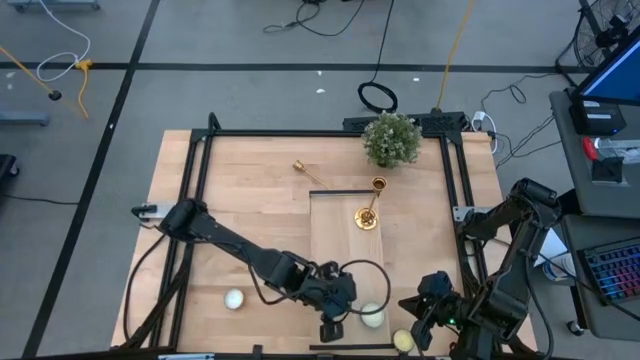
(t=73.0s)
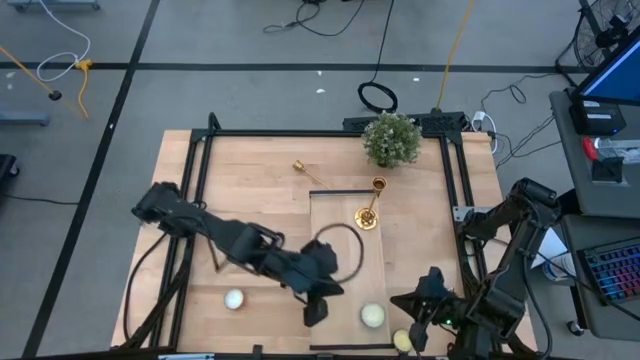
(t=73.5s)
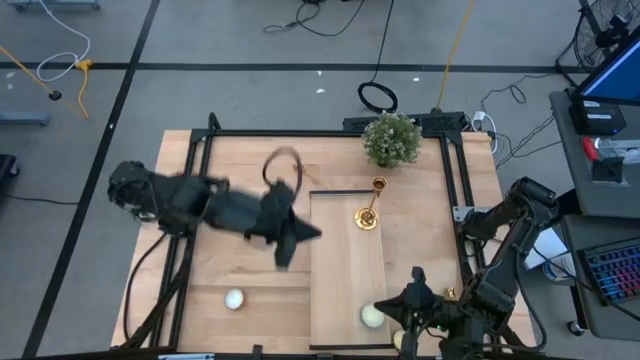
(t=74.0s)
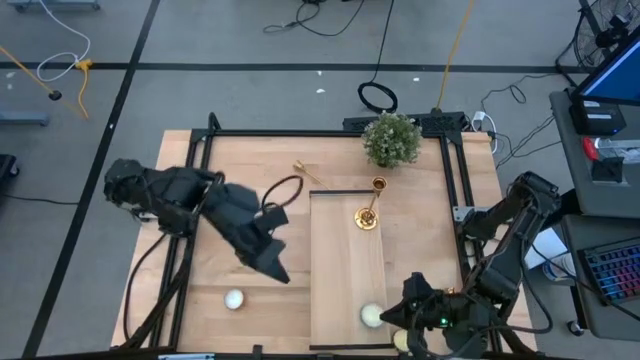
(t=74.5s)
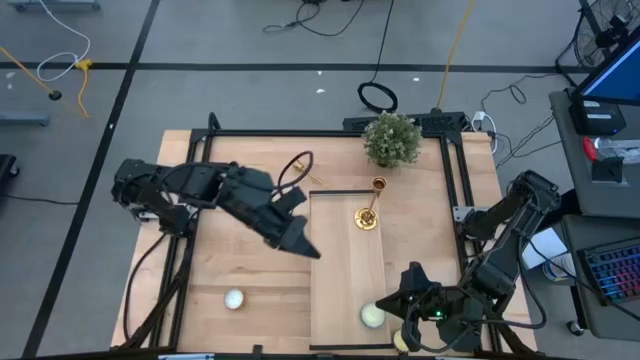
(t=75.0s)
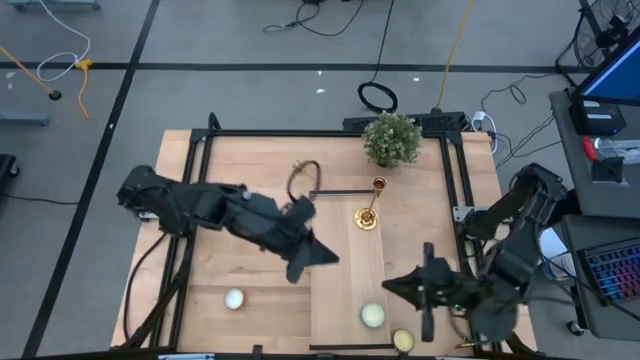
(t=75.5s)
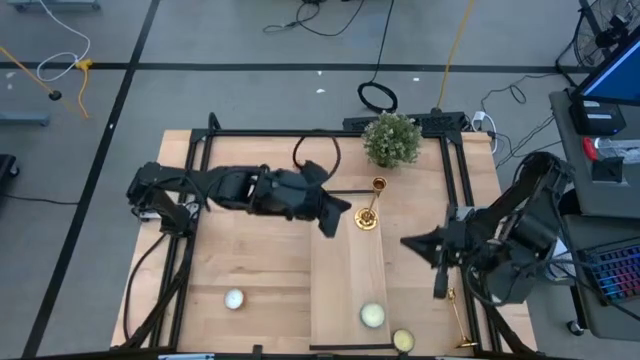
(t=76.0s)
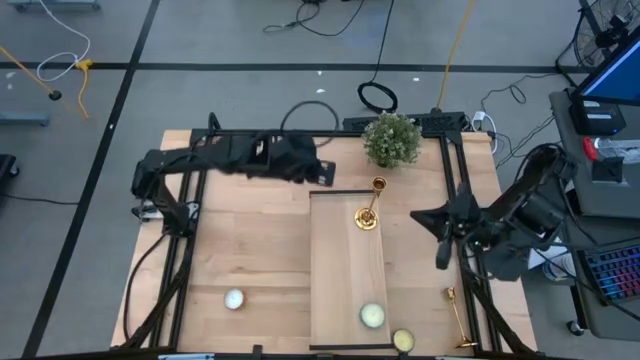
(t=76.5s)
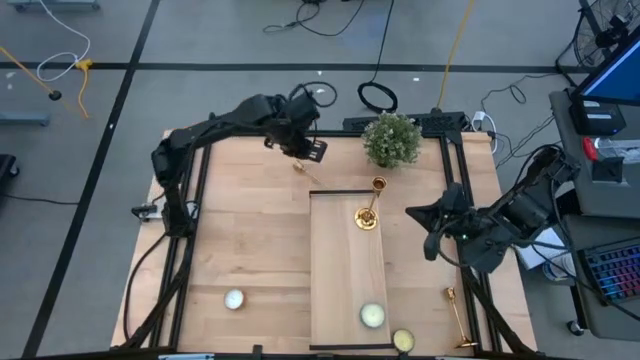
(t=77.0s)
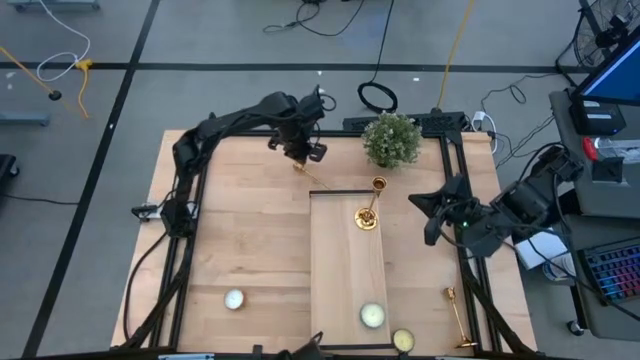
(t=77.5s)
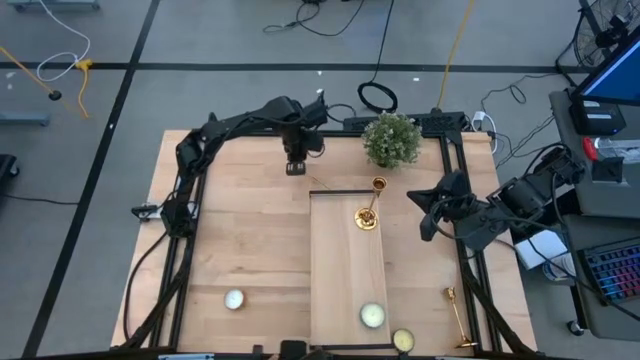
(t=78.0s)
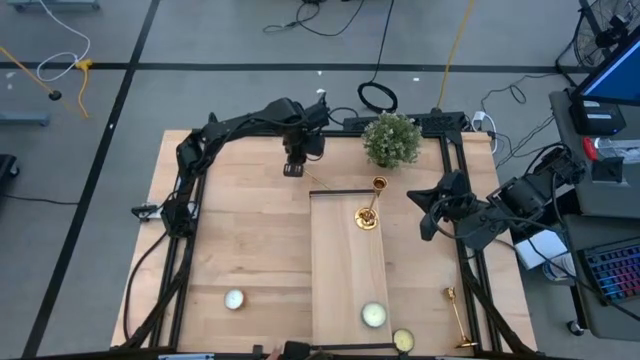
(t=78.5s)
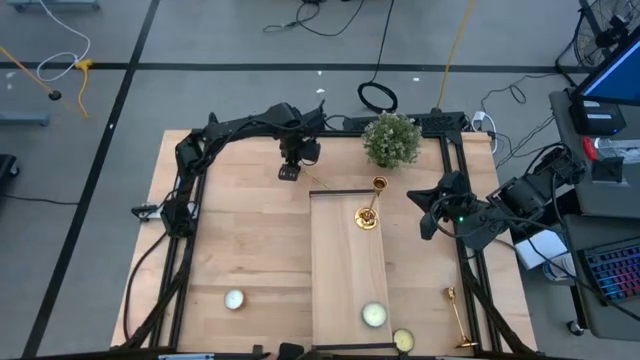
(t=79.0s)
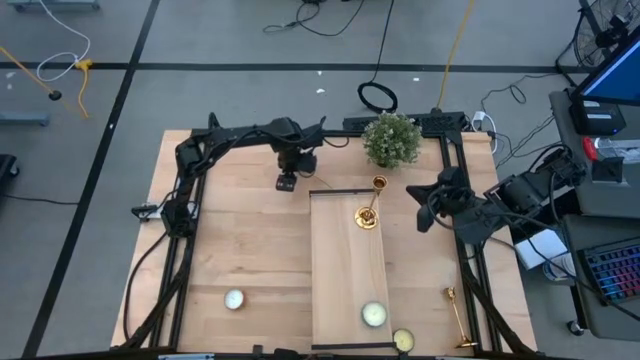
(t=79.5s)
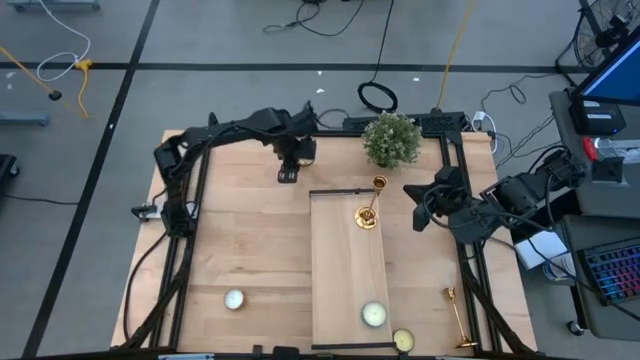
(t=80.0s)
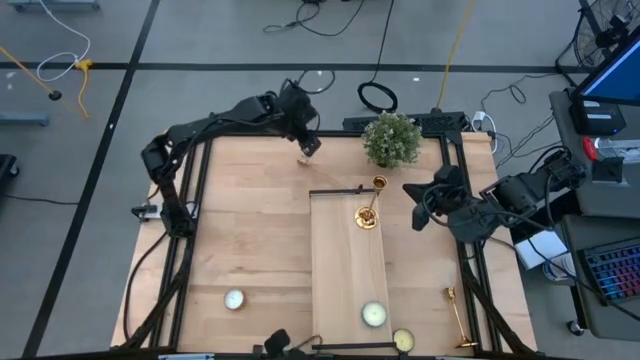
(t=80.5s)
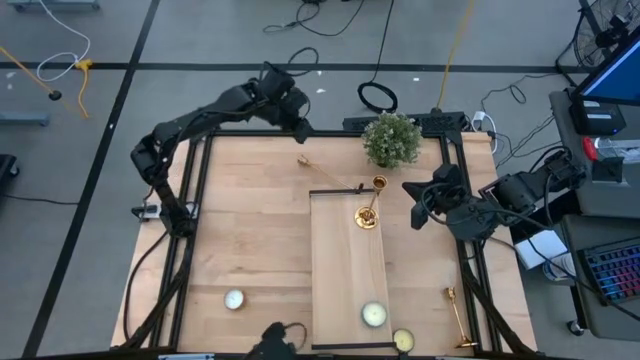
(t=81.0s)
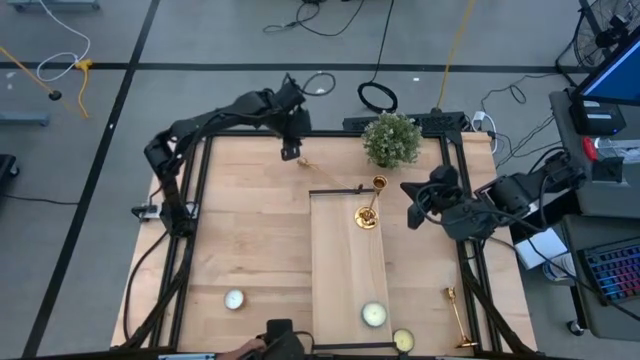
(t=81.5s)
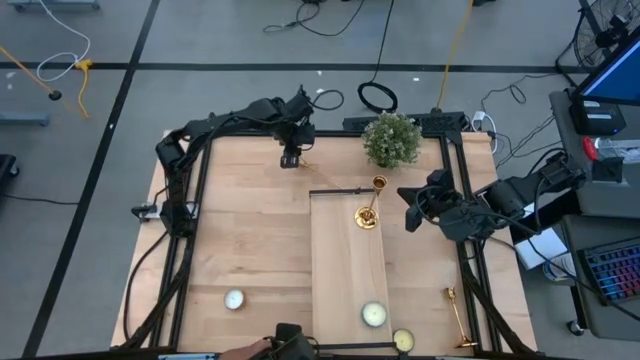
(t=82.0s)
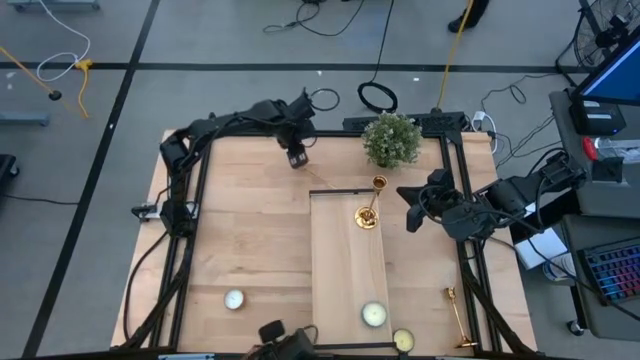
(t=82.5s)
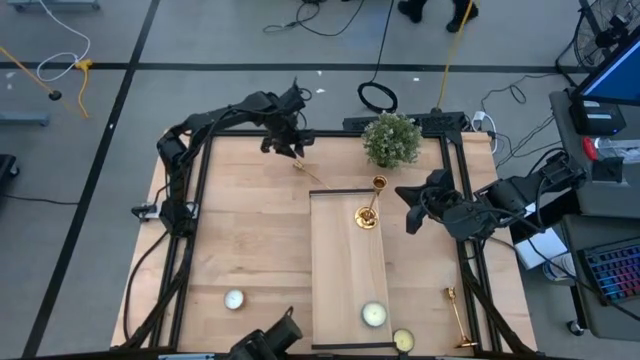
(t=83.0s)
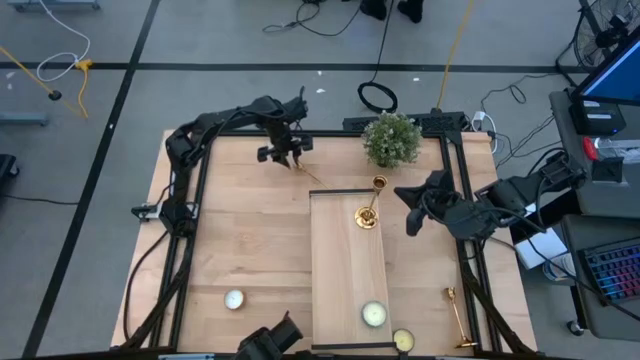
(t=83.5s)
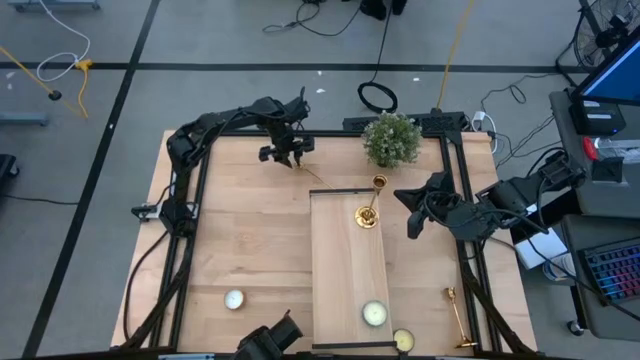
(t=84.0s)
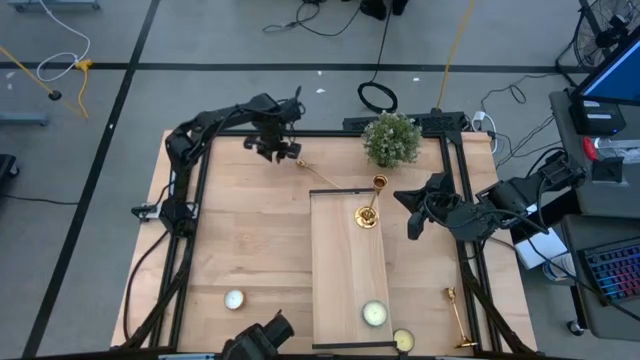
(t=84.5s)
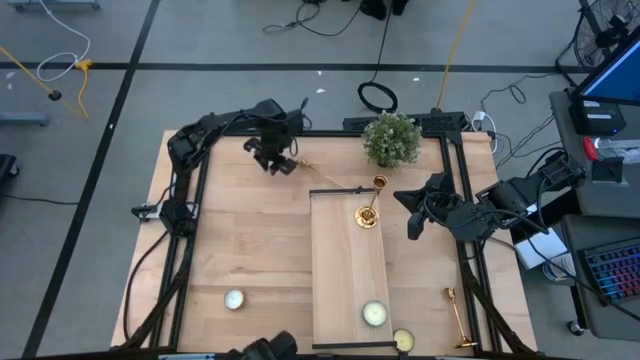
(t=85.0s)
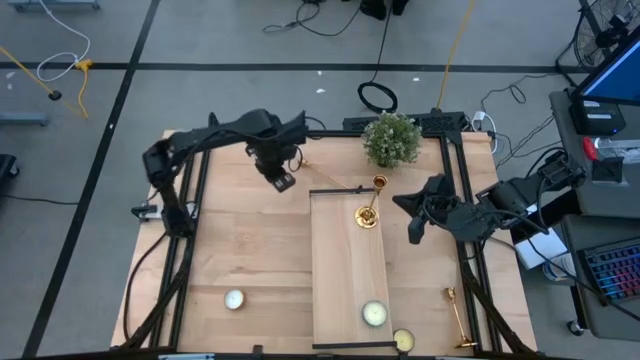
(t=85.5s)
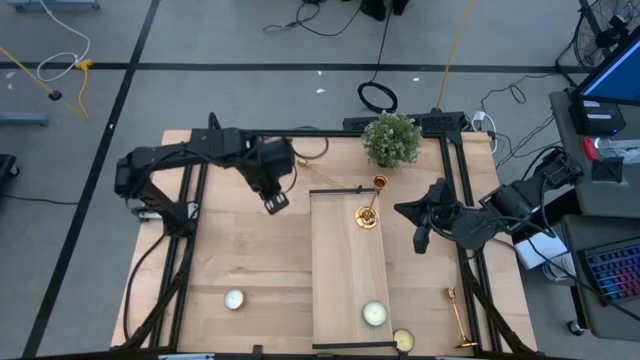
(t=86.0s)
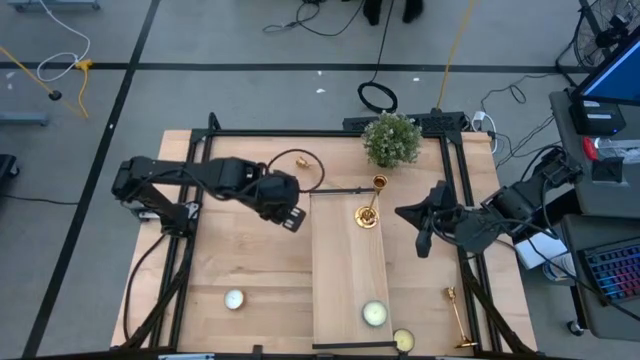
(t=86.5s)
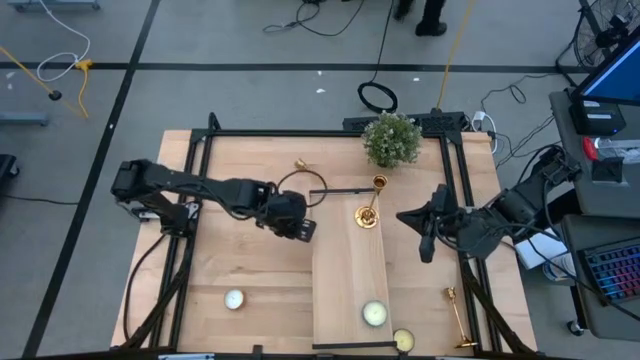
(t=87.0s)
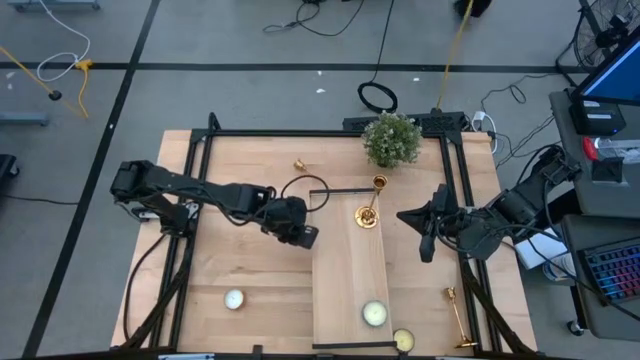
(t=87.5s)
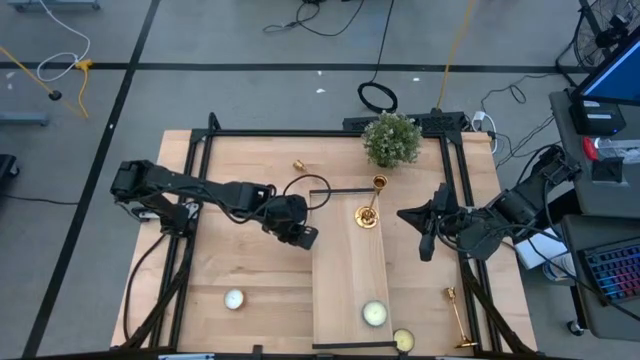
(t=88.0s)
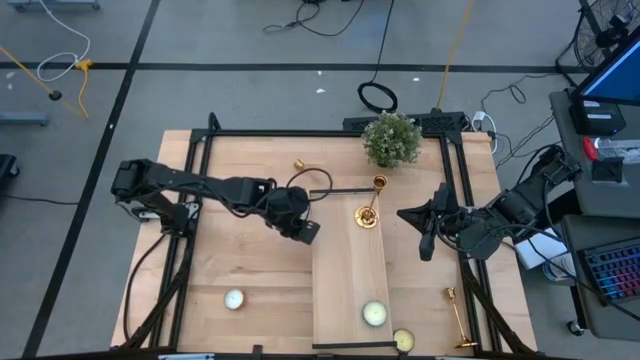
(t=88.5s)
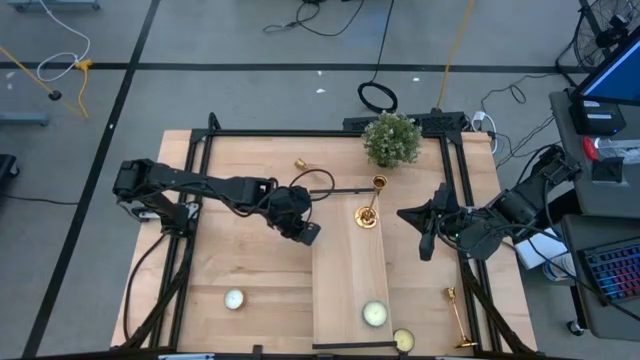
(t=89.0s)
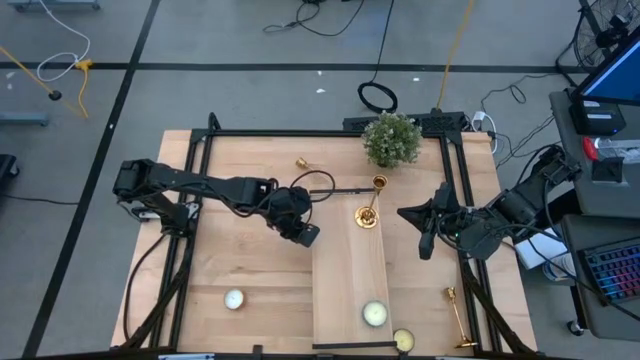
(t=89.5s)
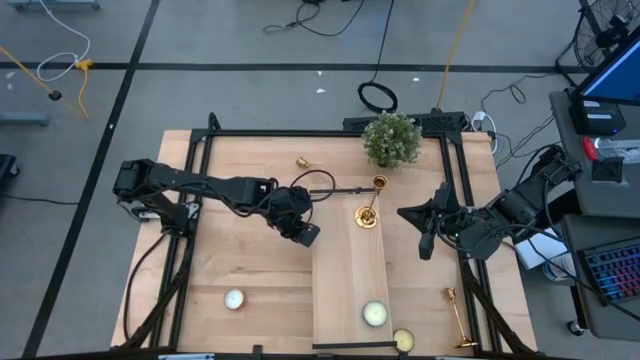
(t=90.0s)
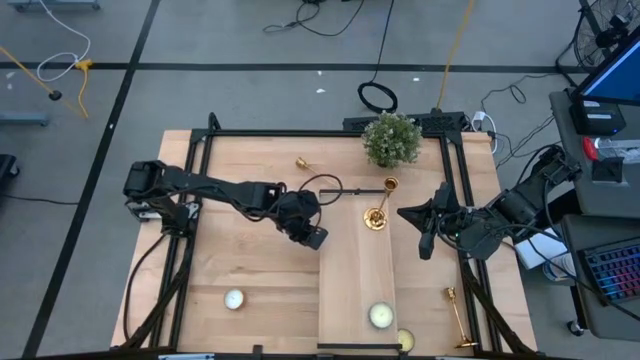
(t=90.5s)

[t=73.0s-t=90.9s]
Task: Pick & Place candle stick holders
Adjust the shelf

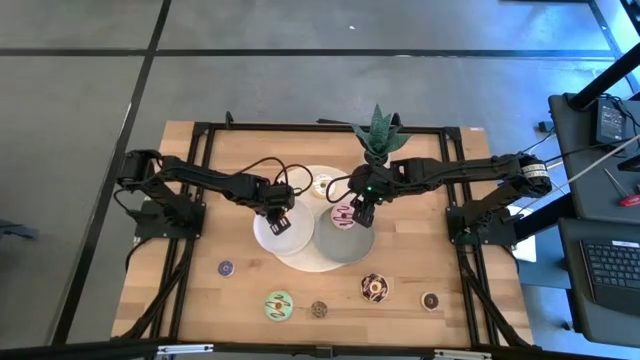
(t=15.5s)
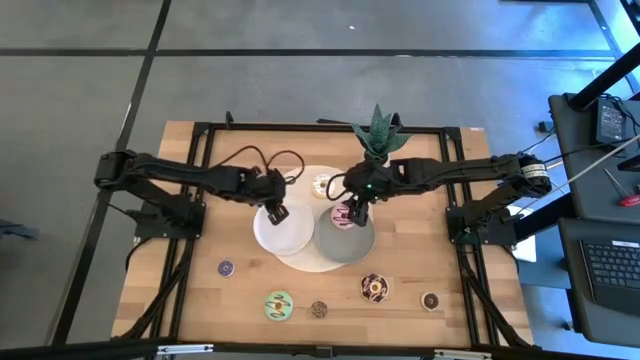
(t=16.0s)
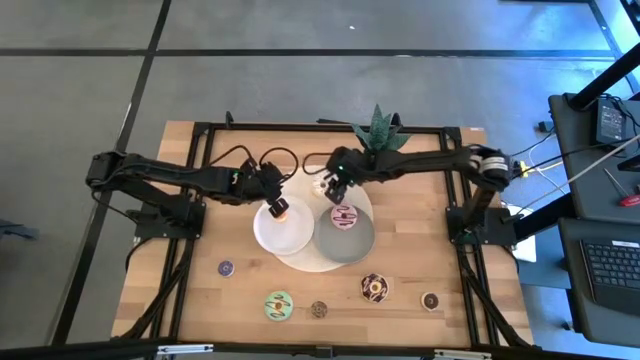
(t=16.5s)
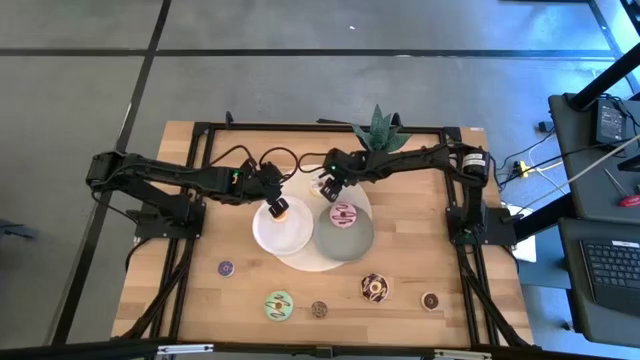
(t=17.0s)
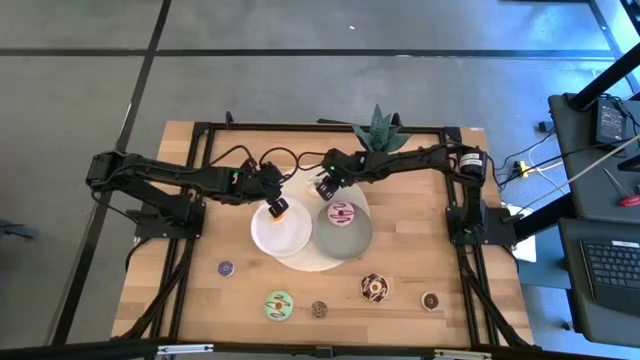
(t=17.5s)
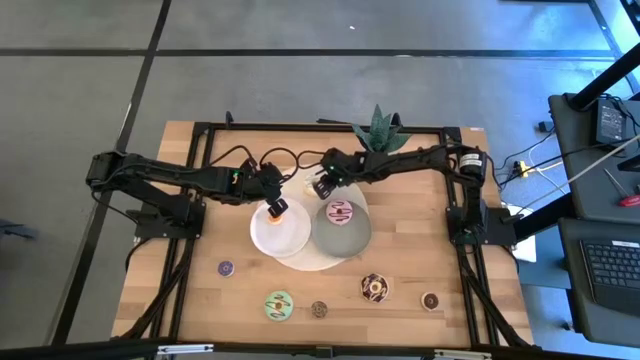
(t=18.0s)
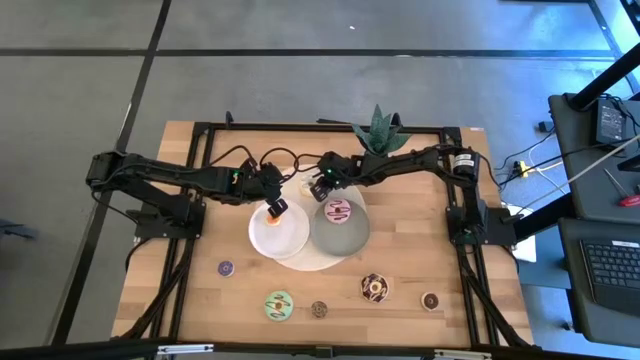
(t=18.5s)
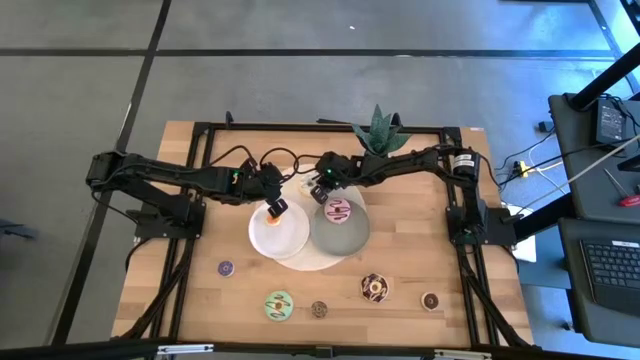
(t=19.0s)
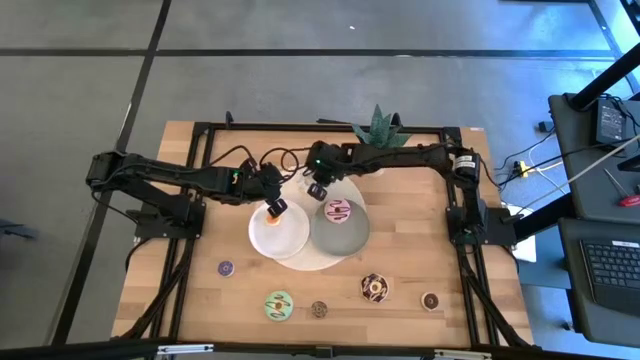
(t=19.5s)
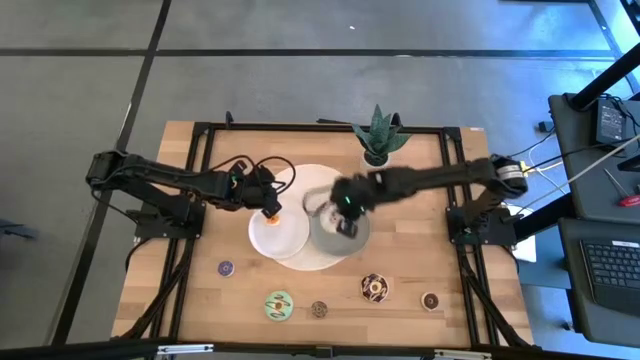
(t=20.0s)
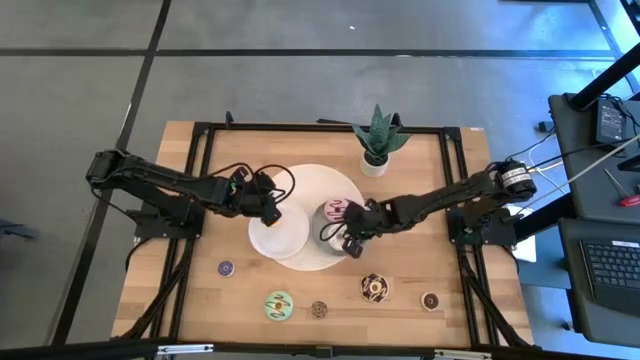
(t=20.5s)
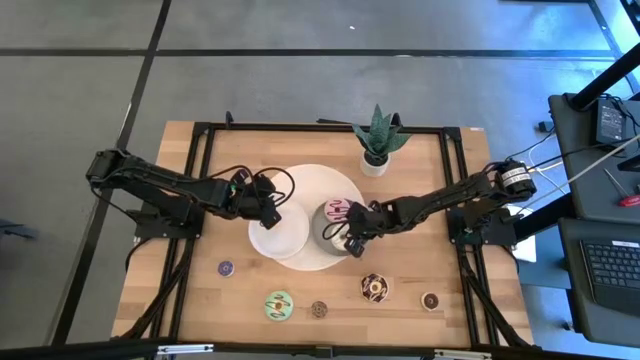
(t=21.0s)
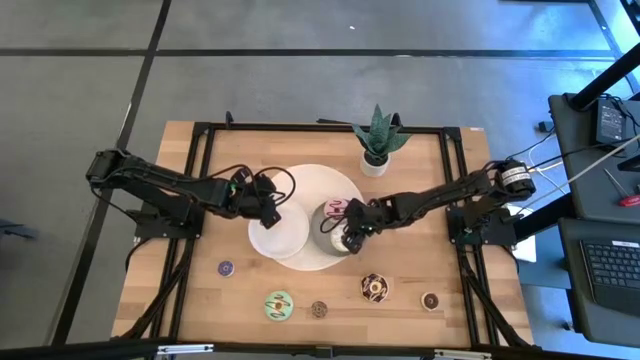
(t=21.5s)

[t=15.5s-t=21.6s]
Task: Pick & Place donuts
Put the large white donut on the gray plate
